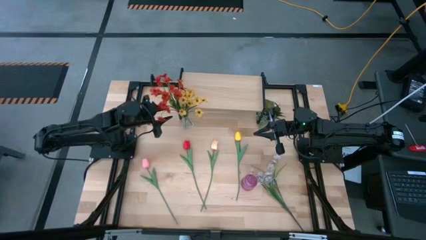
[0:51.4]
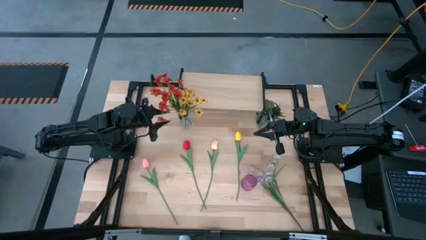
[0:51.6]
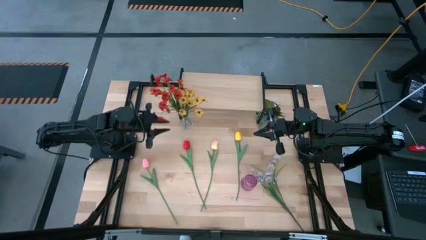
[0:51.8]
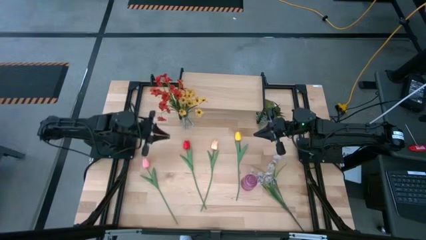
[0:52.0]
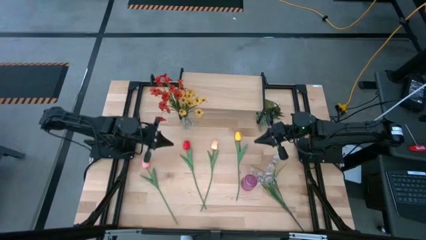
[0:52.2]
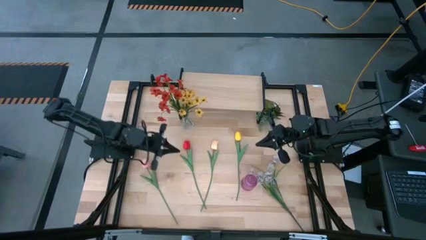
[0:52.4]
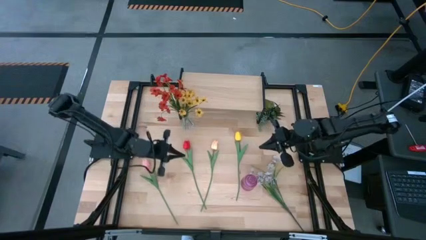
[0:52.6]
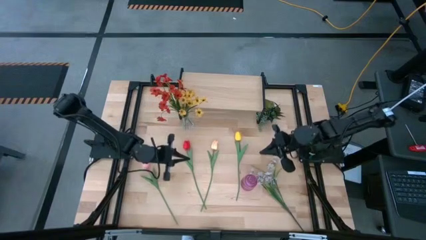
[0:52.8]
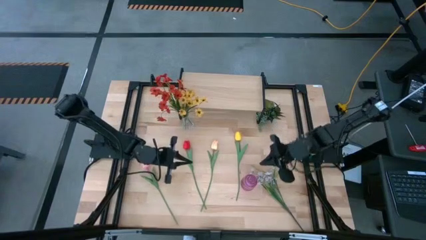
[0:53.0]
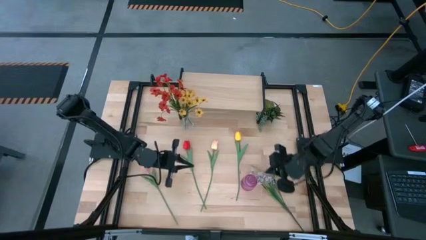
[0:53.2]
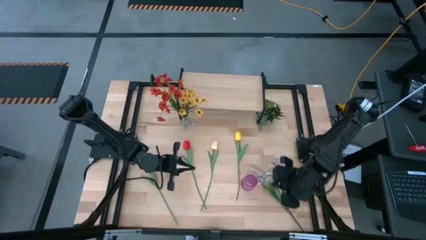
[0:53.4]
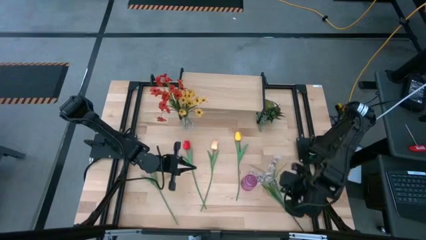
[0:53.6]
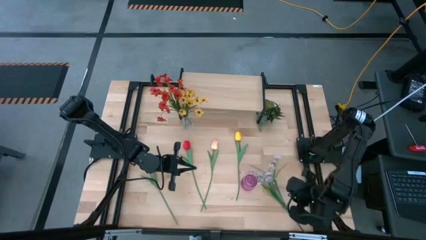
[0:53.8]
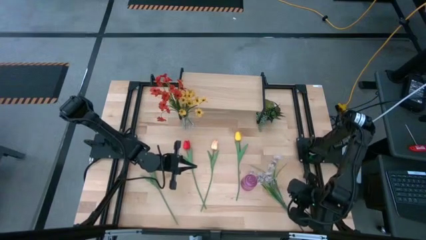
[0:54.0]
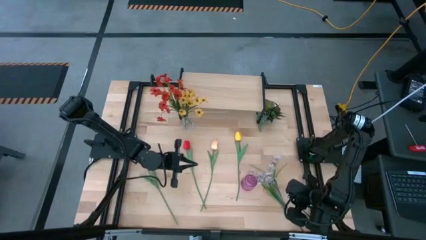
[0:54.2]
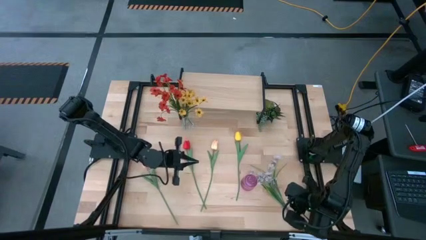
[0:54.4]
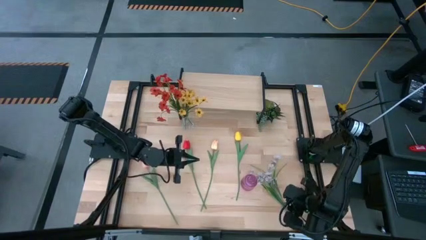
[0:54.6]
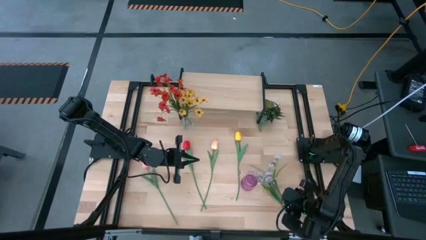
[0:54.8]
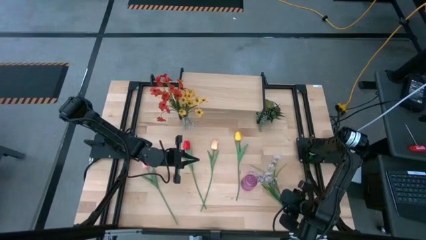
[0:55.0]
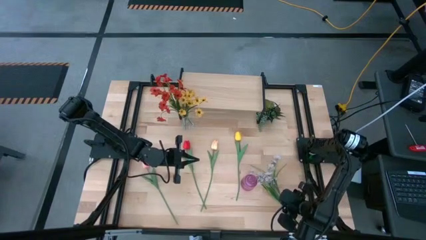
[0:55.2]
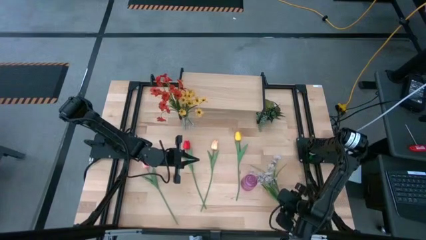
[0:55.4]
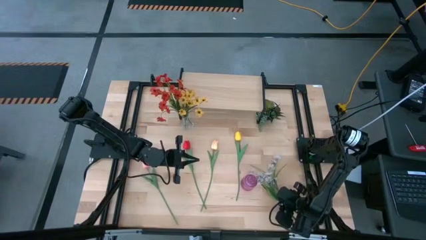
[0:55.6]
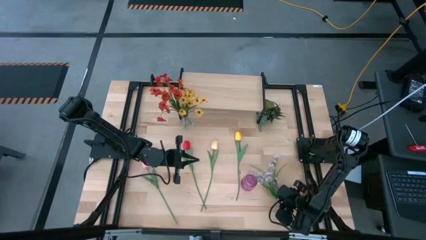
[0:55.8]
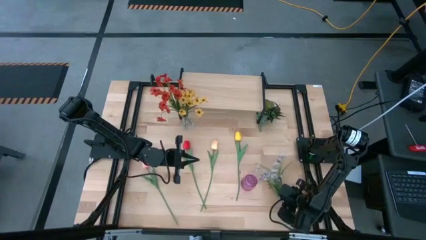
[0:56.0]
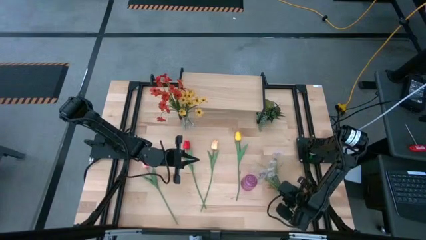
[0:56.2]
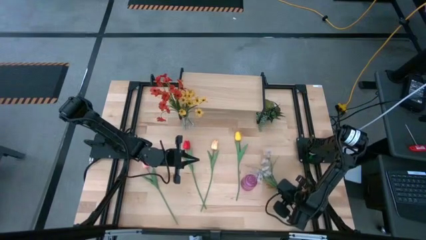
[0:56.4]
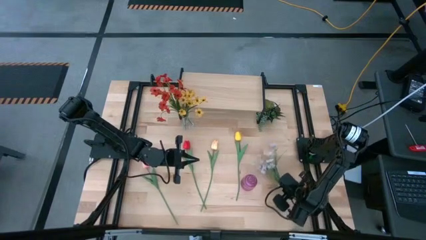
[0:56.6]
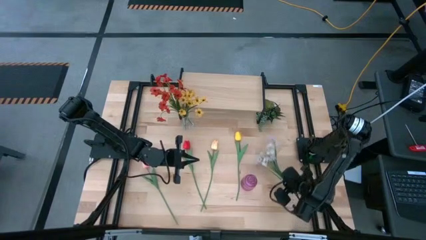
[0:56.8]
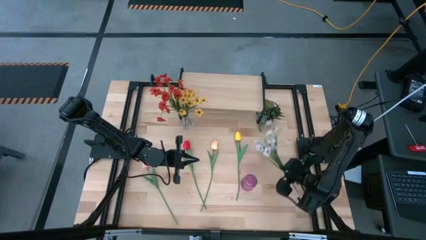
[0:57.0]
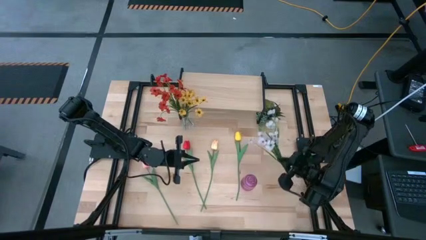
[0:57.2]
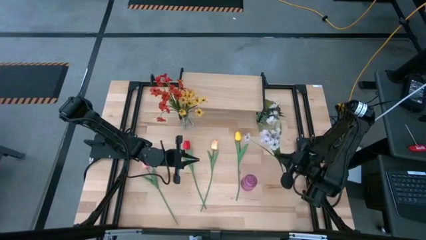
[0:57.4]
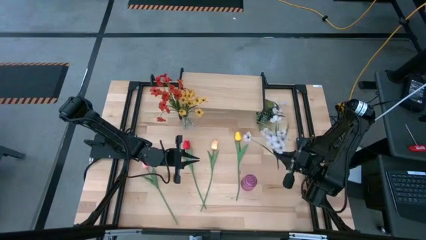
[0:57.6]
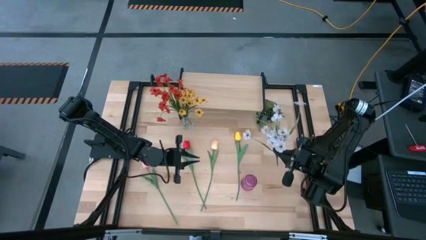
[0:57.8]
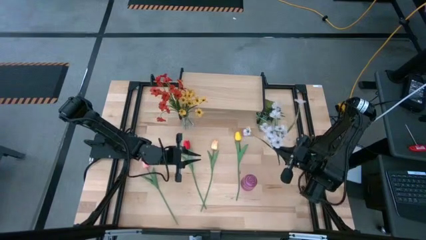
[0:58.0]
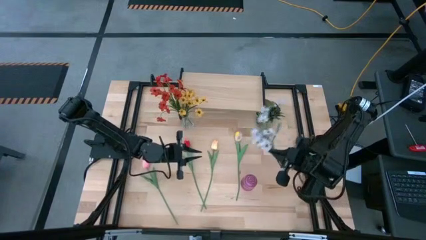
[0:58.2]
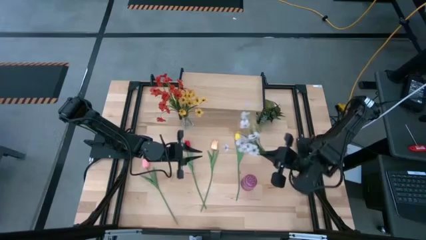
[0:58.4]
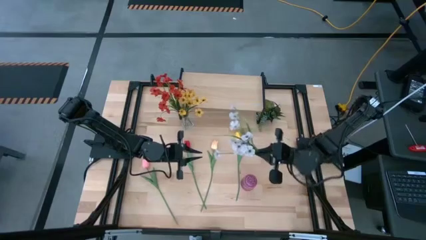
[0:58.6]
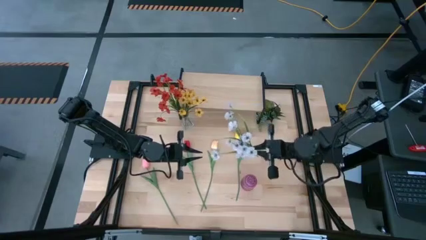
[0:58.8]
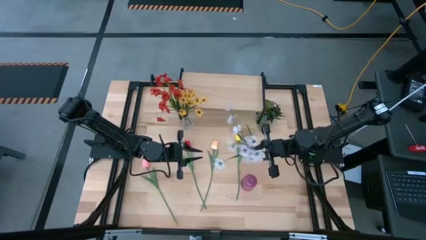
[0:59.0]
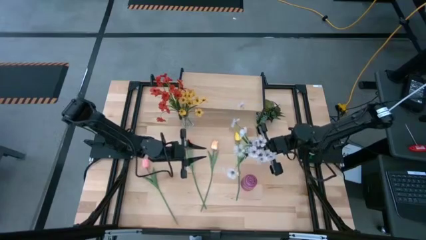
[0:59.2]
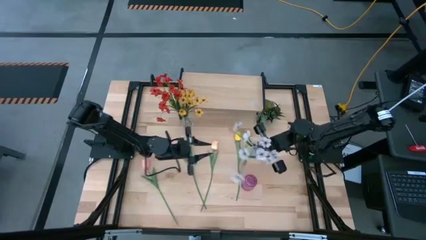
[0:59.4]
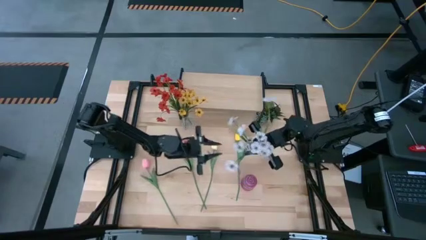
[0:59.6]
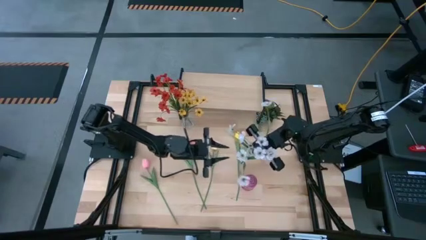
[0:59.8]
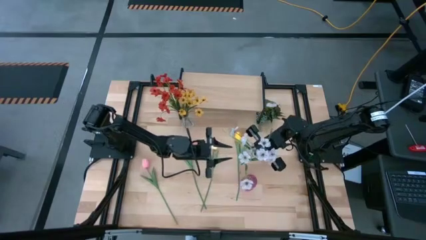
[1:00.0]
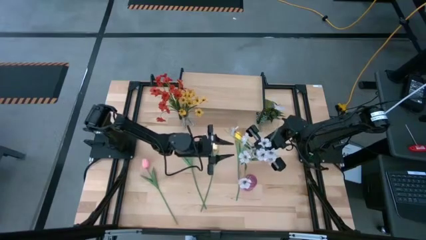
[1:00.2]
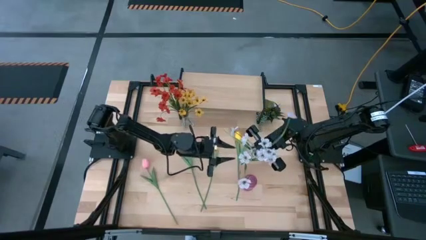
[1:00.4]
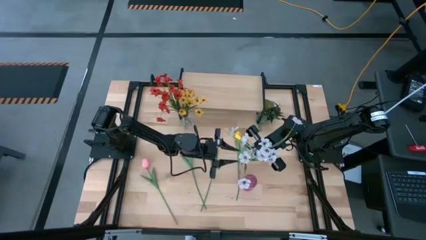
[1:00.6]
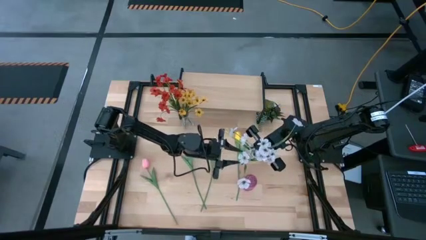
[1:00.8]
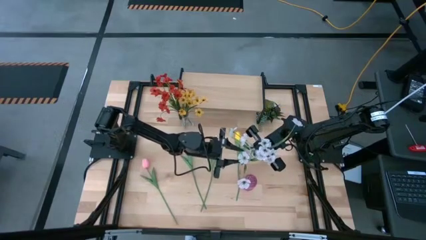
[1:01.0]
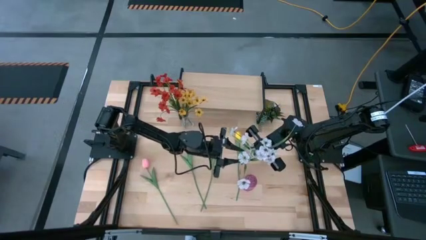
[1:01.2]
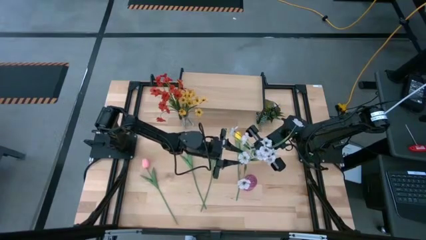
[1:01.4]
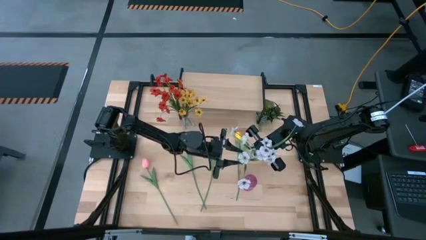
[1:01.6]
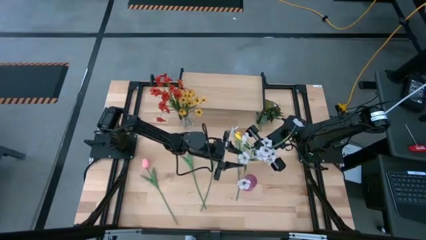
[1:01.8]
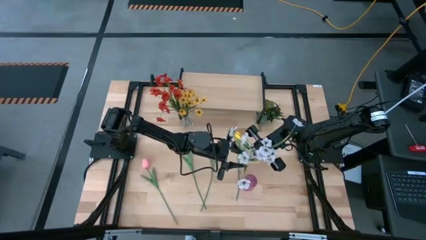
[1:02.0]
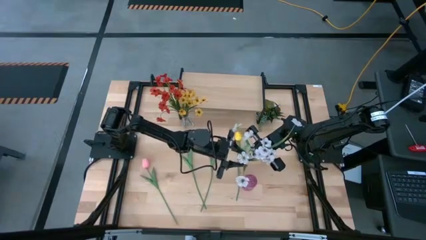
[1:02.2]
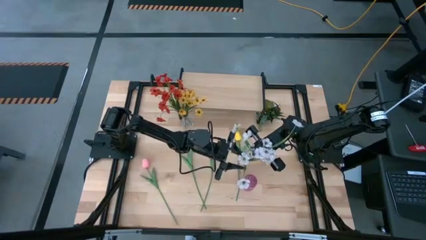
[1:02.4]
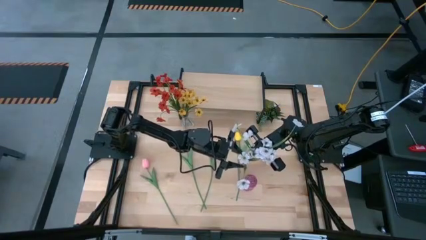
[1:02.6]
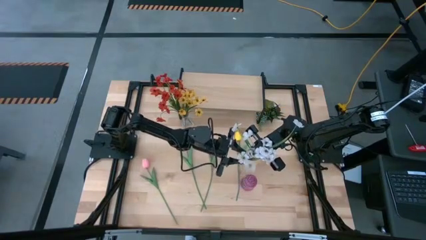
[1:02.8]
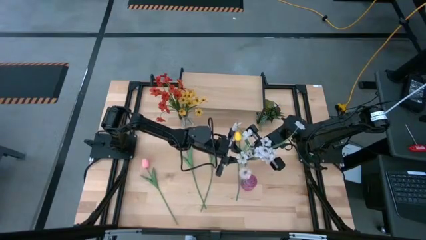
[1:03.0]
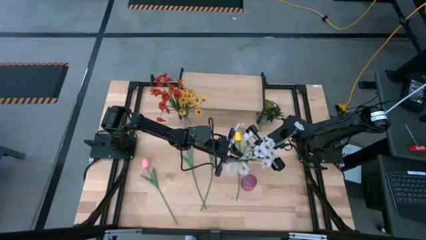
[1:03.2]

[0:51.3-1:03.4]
Task: Pick and place flowers into a vace then onto a shelf
Put the white flowers into the transparent vase
